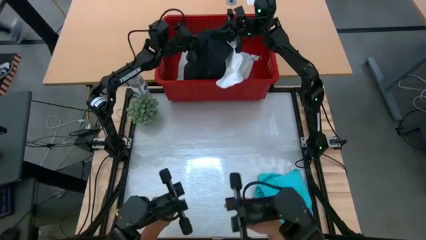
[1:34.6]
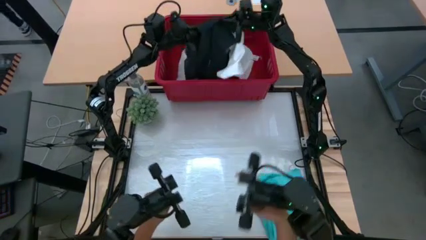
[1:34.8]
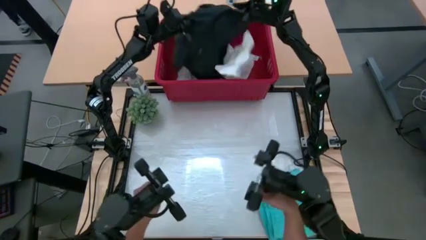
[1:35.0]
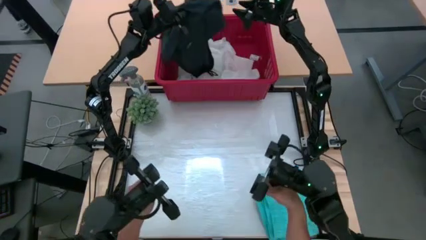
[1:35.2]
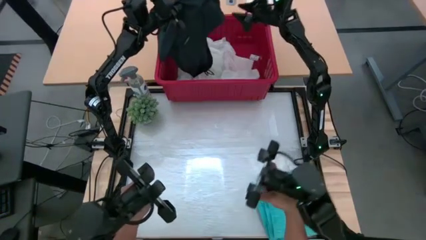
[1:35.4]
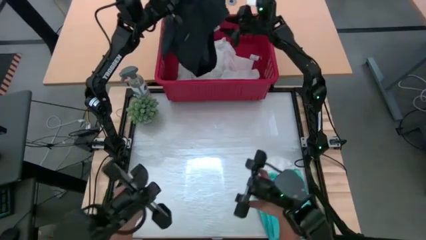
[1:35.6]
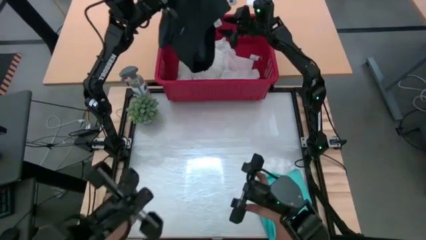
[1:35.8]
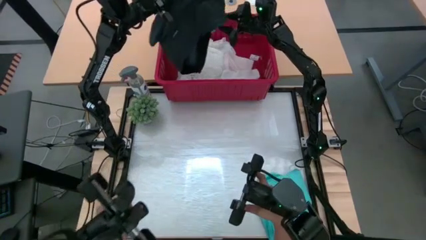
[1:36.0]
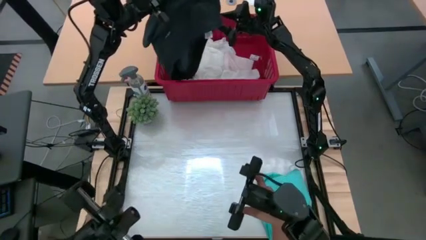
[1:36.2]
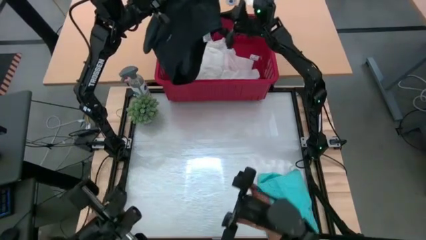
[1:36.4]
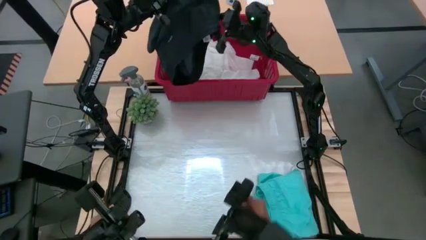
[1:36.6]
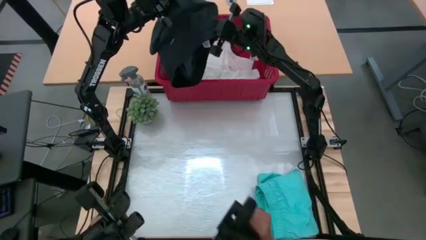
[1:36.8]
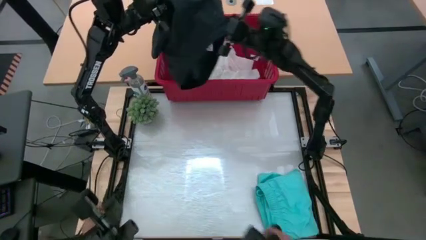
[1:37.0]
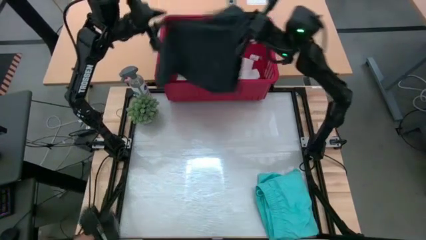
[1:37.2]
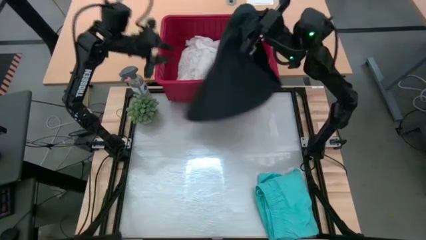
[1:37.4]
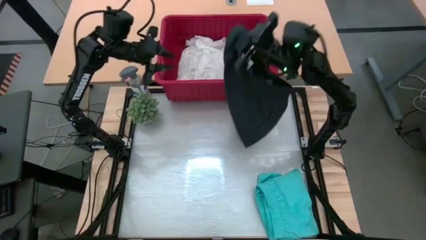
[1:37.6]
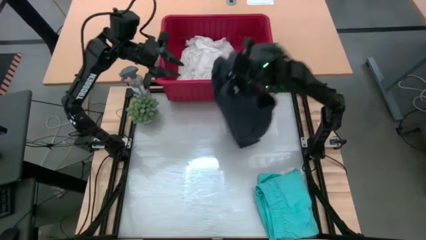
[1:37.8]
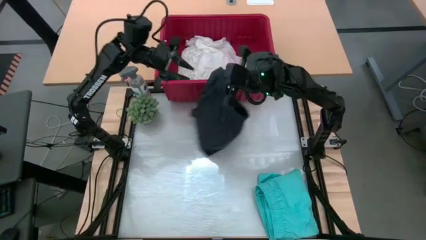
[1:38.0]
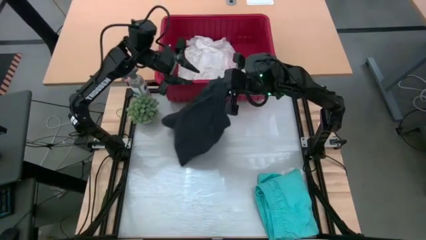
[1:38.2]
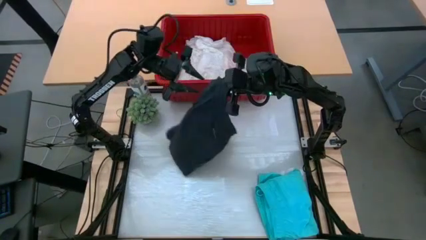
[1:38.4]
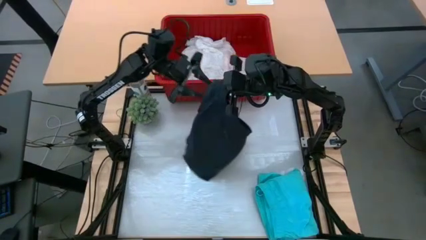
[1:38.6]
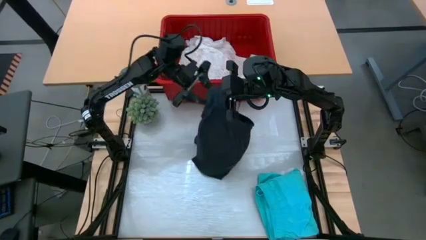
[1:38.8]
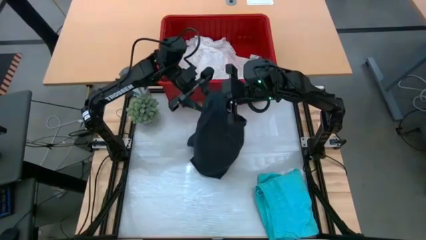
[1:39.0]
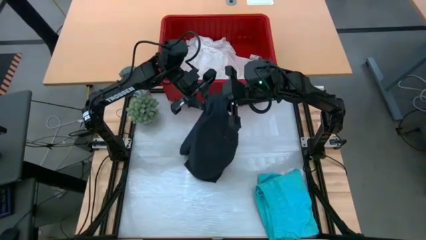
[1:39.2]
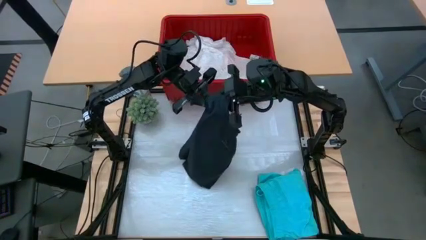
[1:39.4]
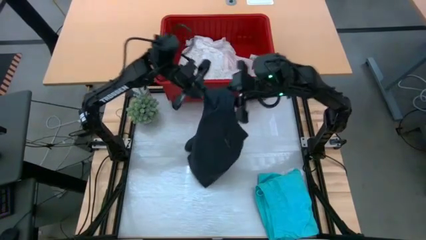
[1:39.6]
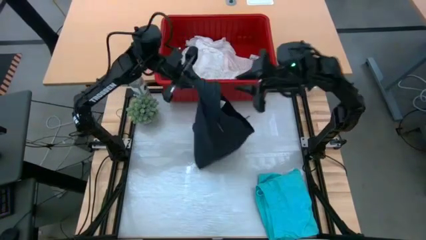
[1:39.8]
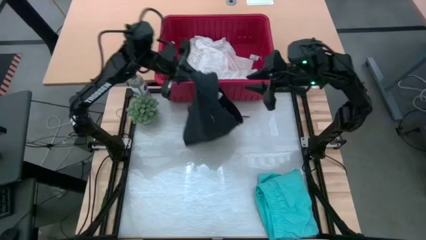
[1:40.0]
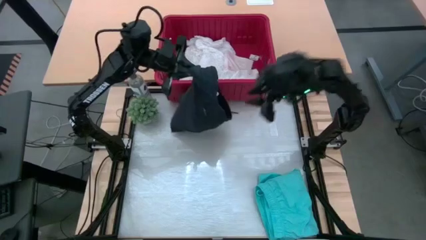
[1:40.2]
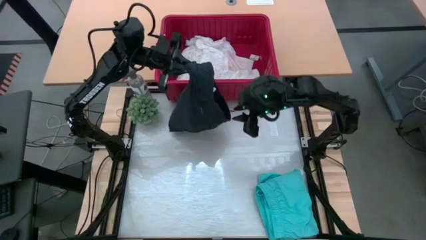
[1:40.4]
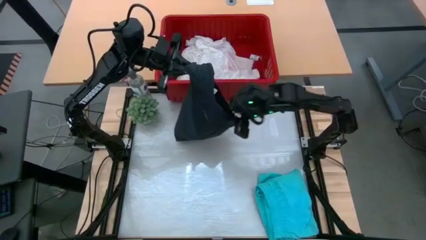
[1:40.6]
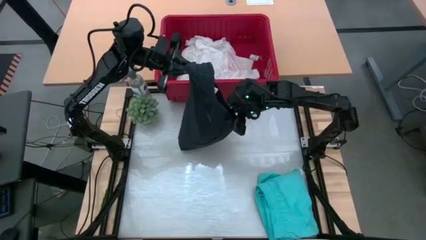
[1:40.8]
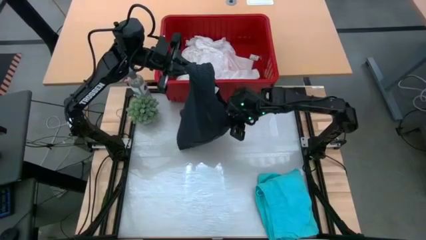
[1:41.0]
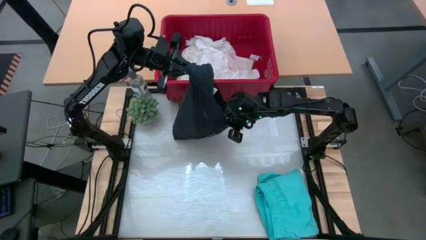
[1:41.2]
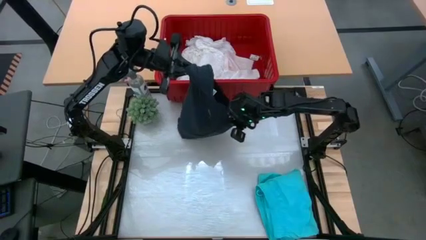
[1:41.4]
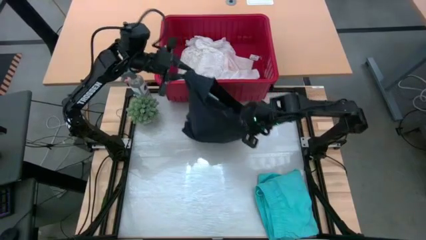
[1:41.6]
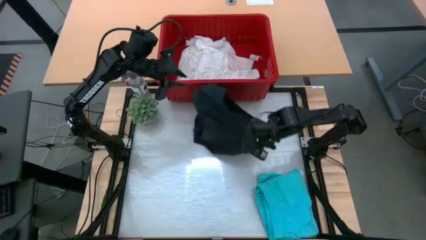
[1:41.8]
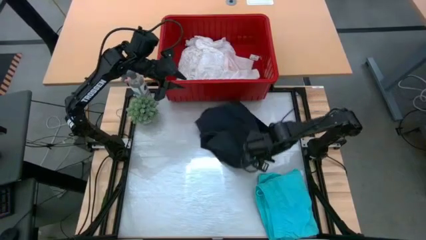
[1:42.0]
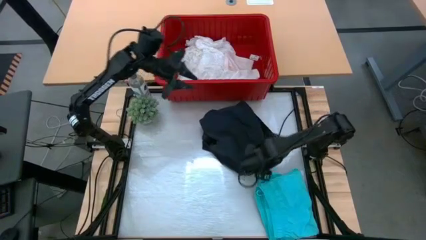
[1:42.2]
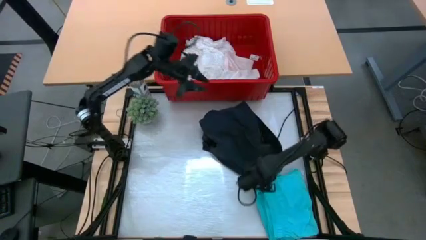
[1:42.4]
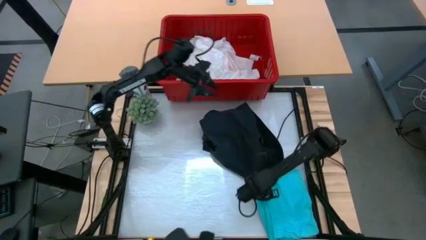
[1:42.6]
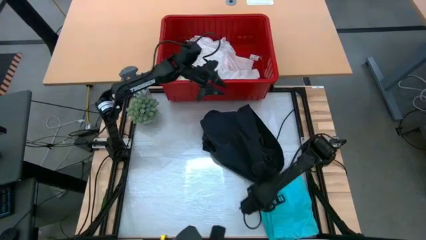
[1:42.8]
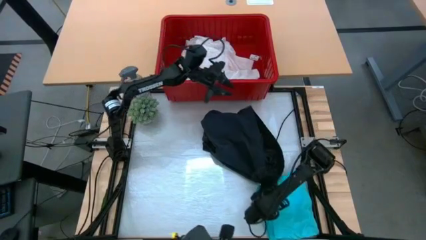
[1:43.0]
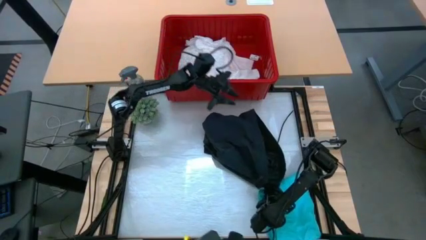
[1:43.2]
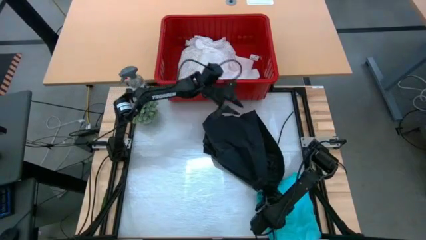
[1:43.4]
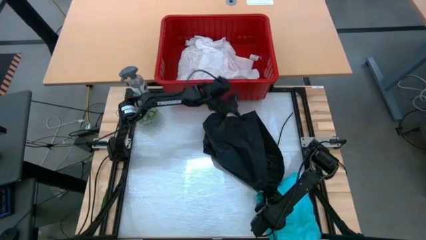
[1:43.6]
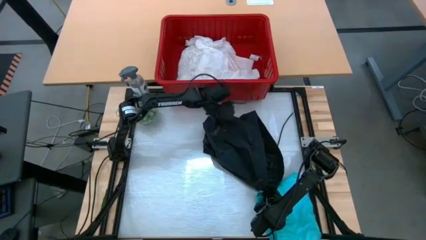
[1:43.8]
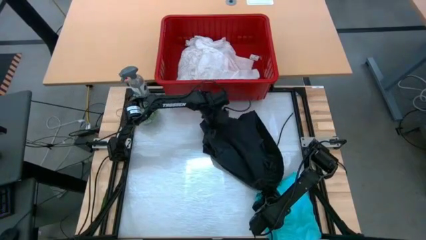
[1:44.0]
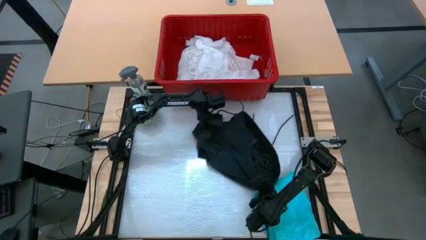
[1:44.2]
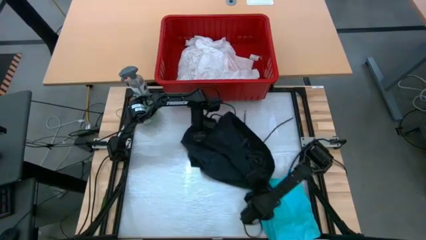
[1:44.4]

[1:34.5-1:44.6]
Task: Fold Laundry from Bin
Fold the black shorts

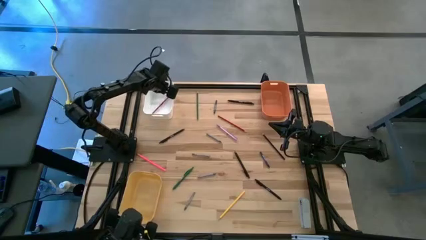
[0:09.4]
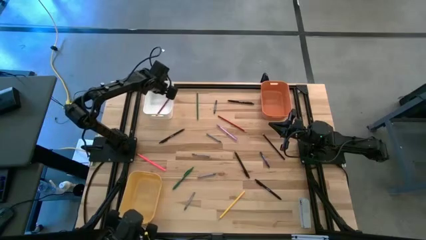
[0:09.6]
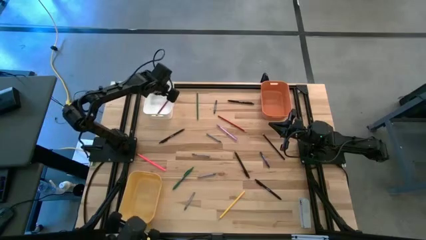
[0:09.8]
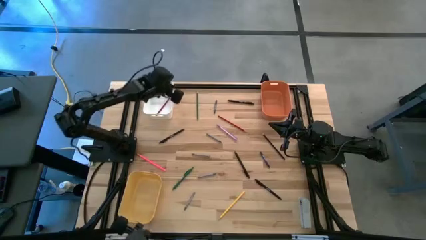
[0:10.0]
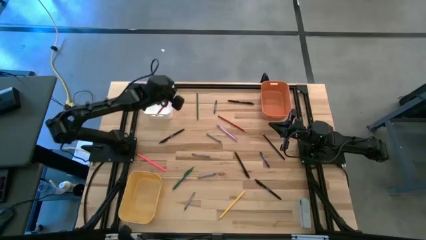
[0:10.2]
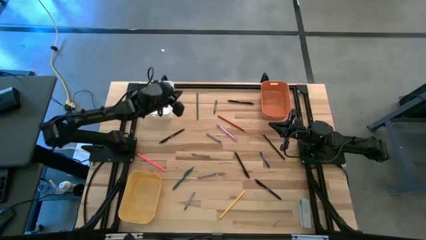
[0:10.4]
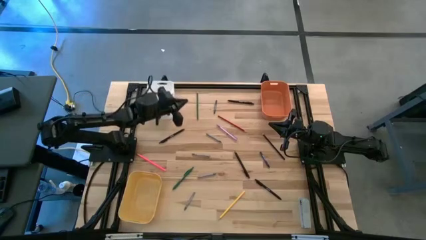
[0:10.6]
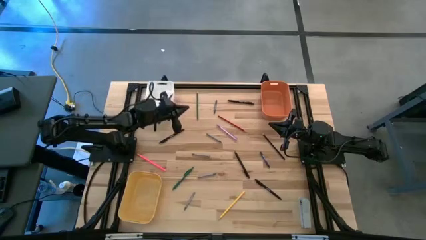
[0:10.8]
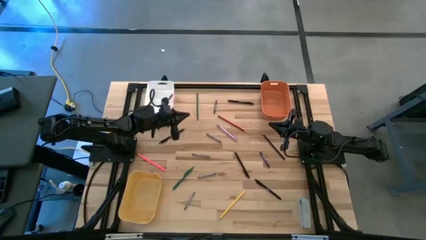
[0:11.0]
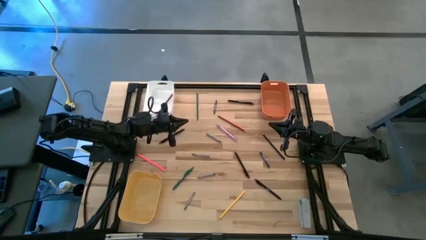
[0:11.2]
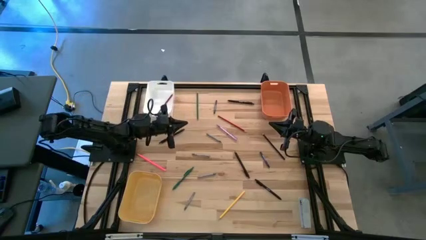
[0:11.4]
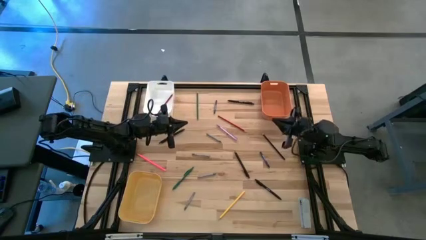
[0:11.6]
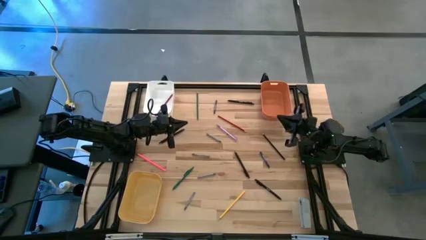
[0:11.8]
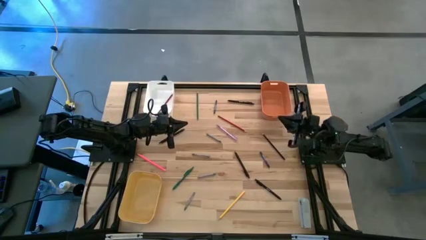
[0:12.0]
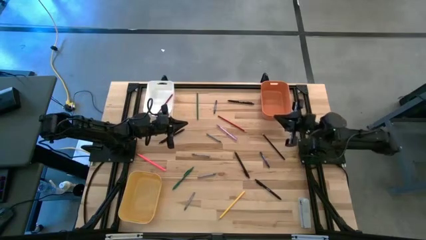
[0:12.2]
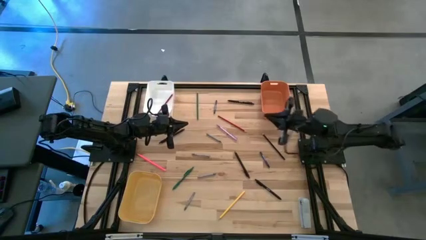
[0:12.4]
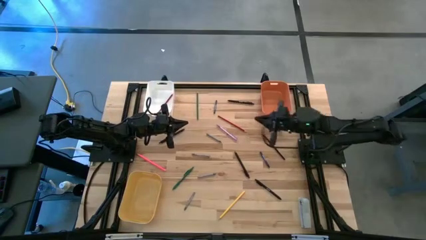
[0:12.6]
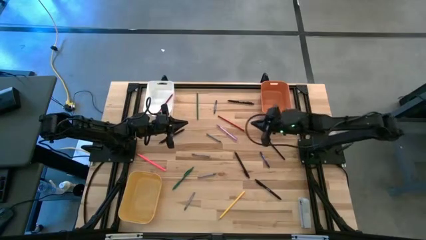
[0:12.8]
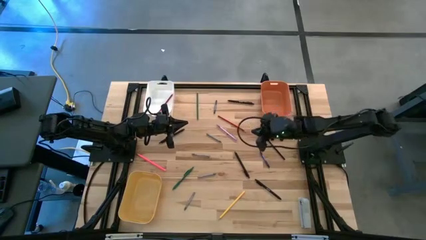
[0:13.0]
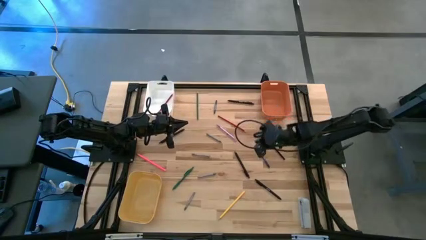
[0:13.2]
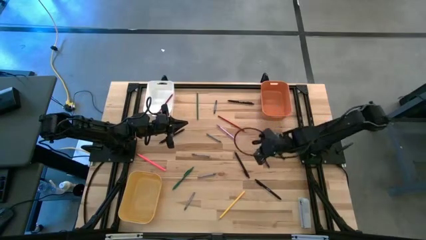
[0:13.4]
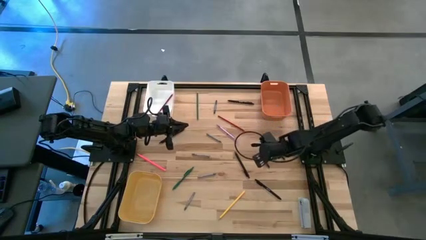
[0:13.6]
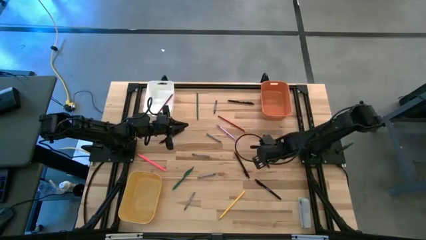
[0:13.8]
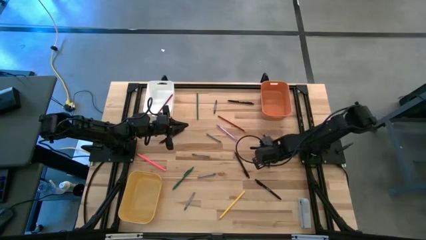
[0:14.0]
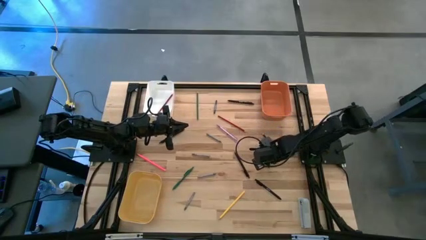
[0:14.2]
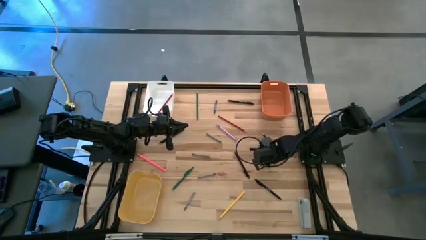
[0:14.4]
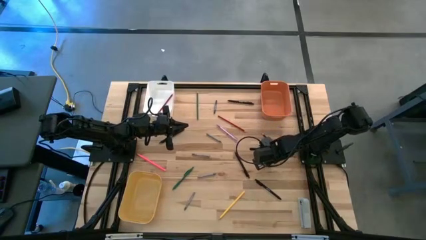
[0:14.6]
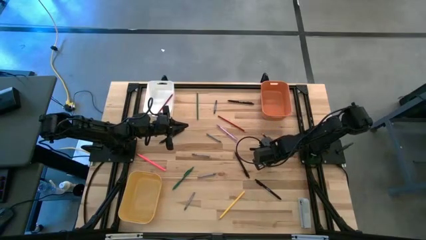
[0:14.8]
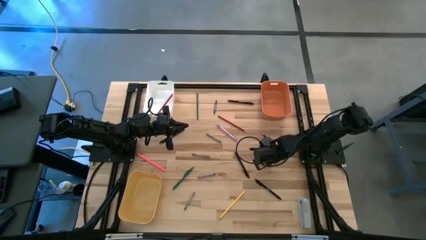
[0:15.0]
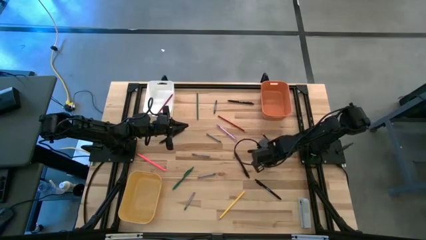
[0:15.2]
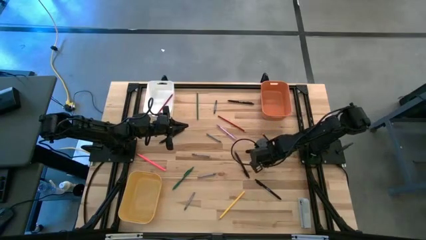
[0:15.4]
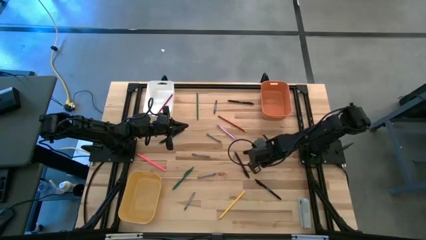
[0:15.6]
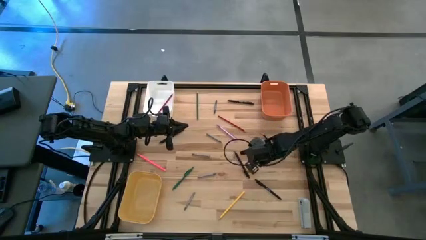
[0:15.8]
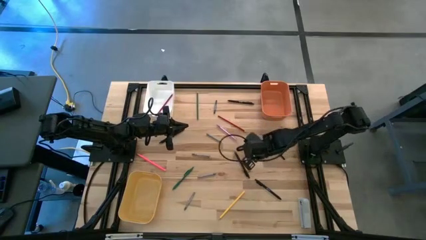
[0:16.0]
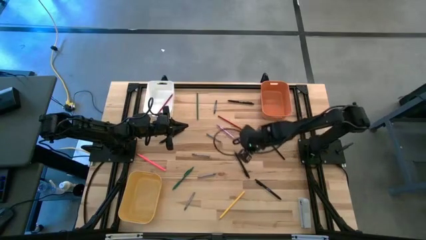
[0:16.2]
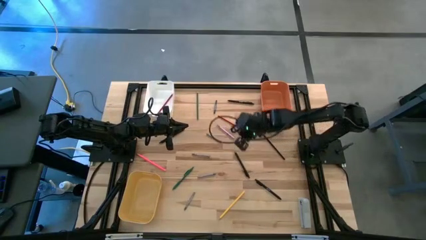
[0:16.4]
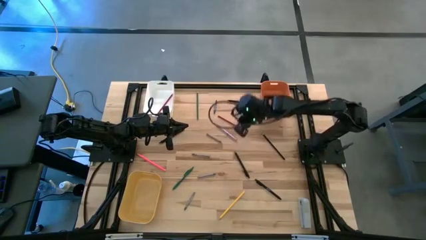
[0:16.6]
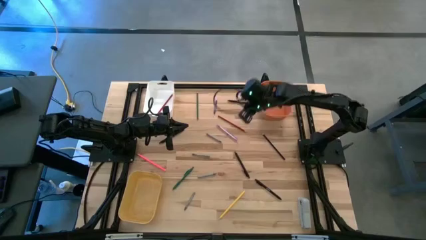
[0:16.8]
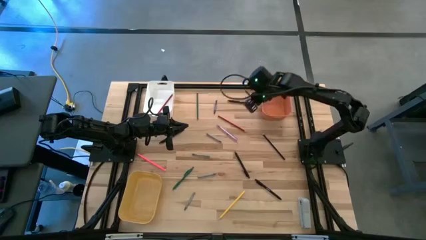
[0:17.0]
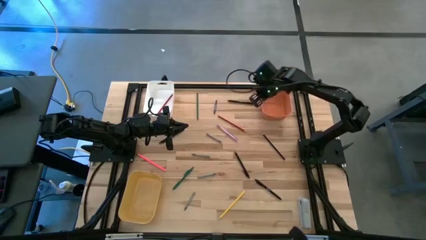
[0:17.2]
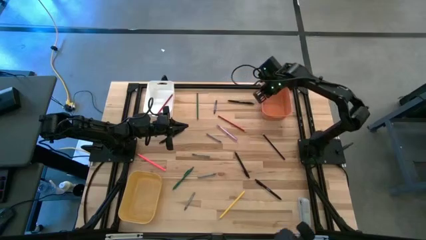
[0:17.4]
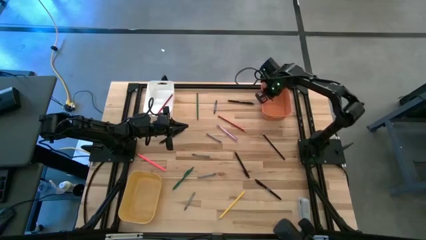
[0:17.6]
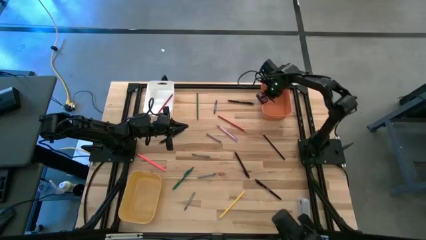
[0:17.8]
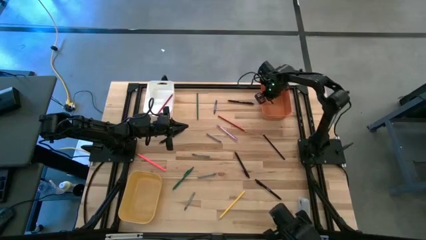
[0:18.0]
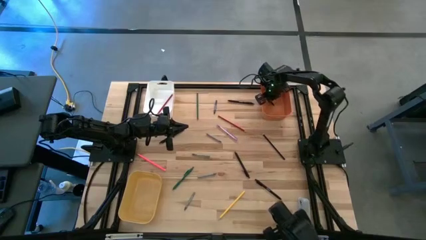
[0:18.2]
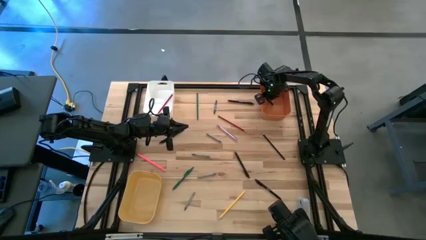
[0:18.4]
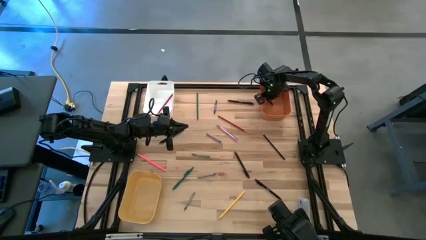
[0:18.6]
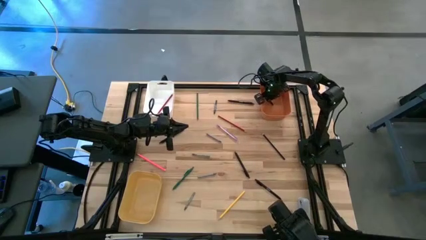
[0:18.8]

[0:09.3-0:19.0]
Task: Sort crayons/erasers/pens/pencils in bins
Put the bottom blue crayon into the orange bin
